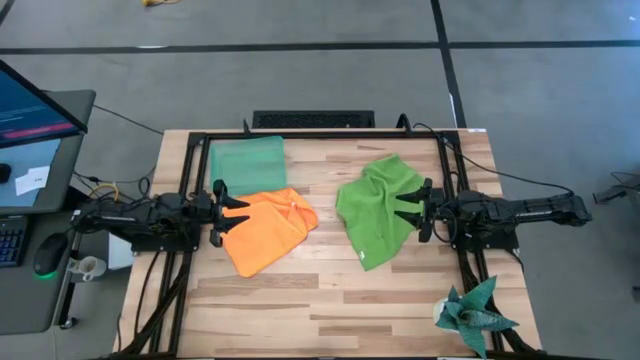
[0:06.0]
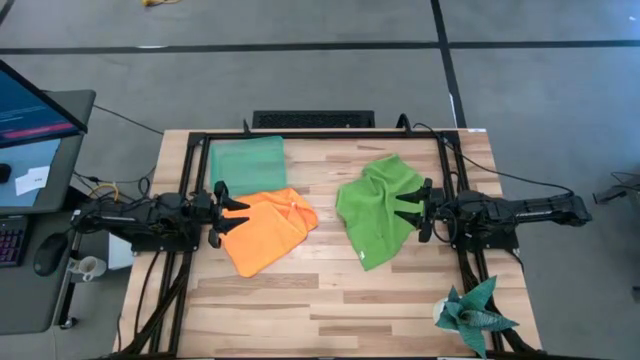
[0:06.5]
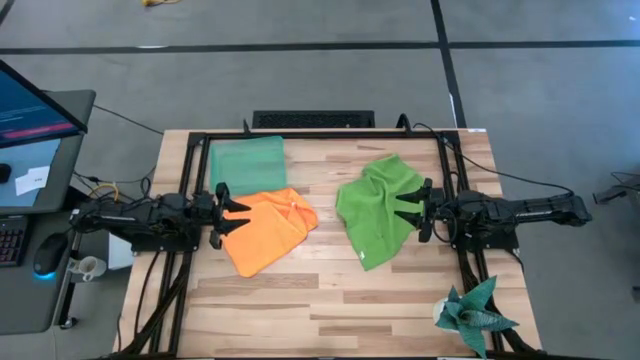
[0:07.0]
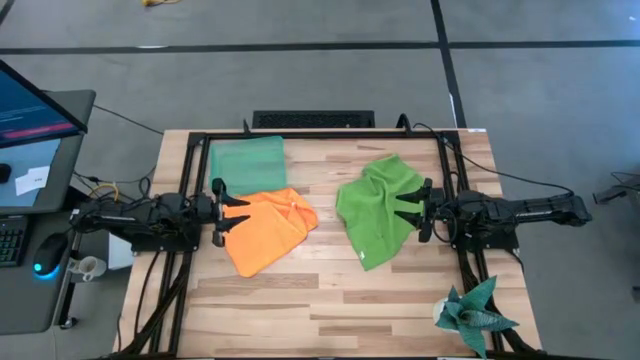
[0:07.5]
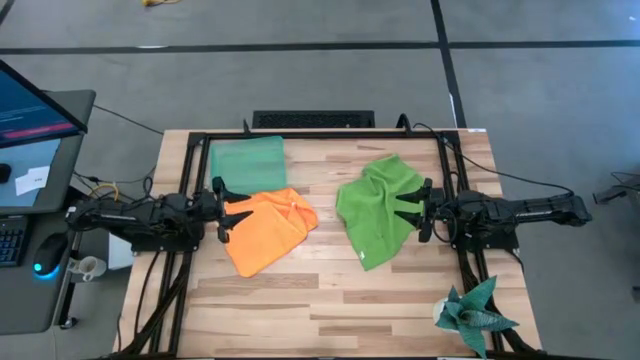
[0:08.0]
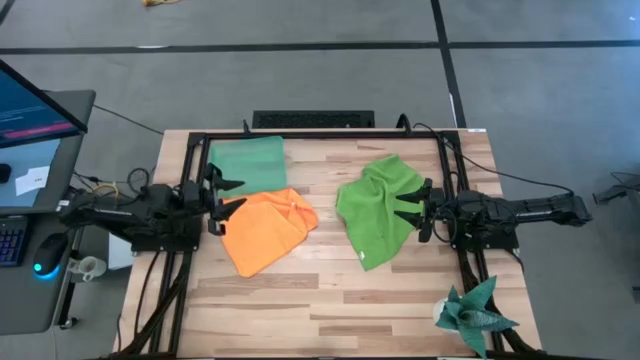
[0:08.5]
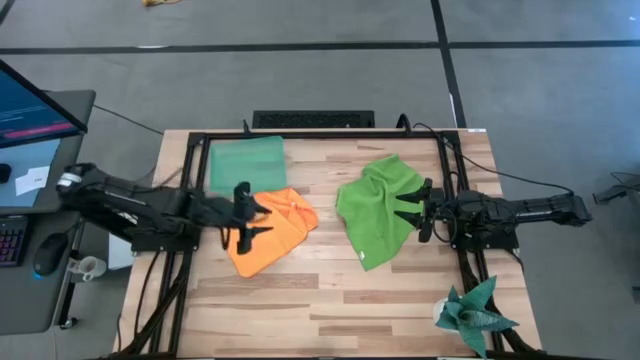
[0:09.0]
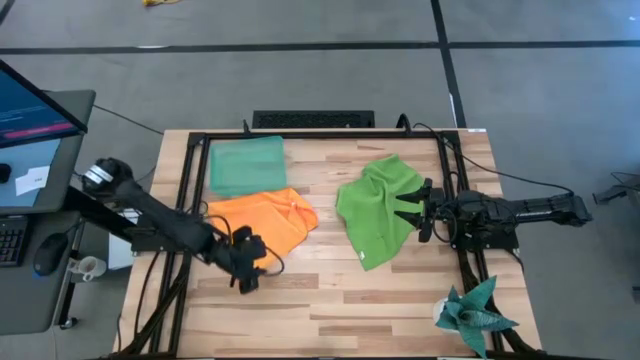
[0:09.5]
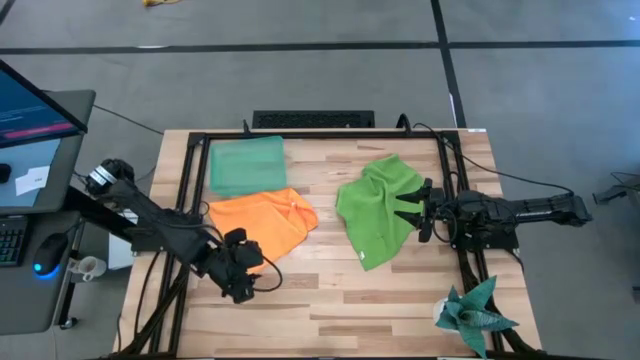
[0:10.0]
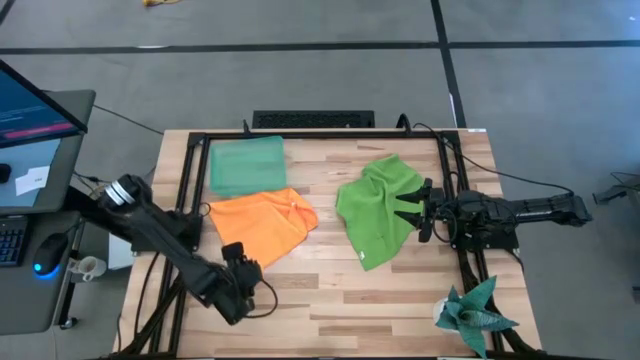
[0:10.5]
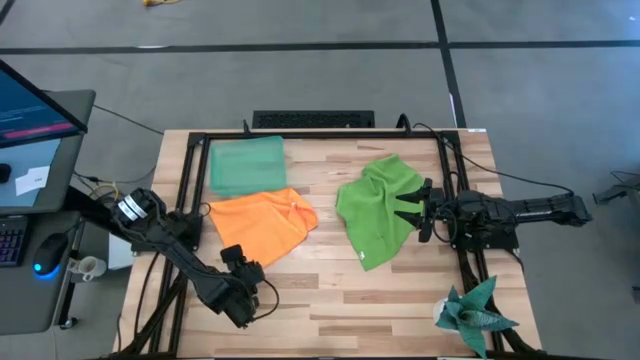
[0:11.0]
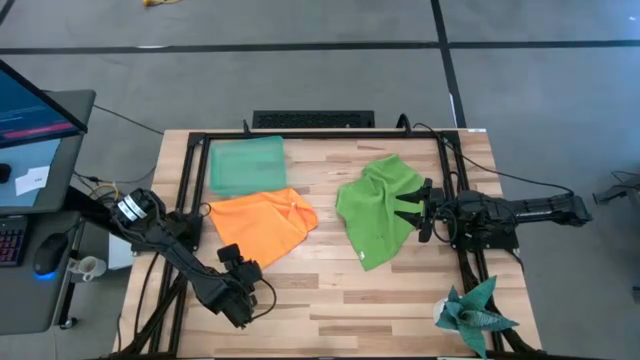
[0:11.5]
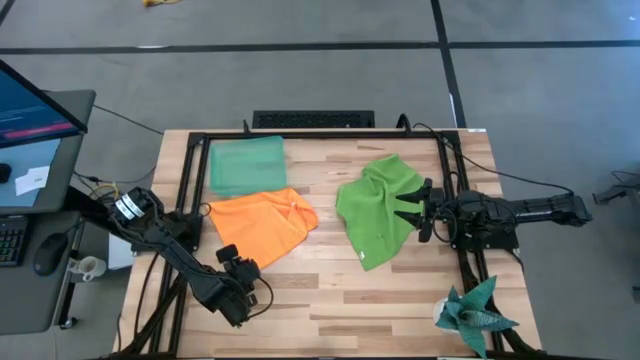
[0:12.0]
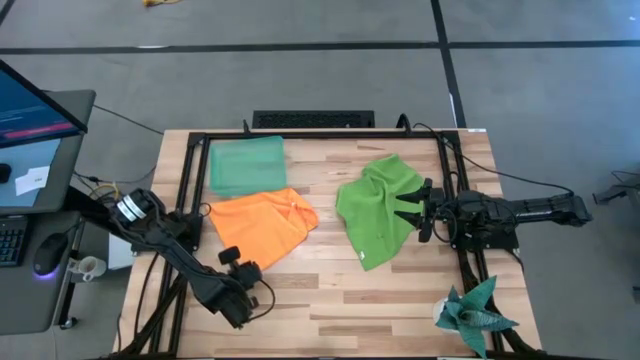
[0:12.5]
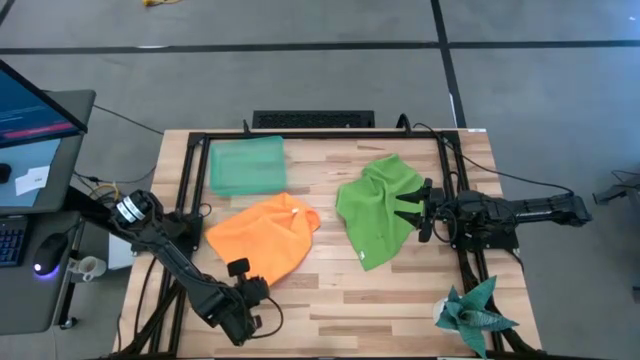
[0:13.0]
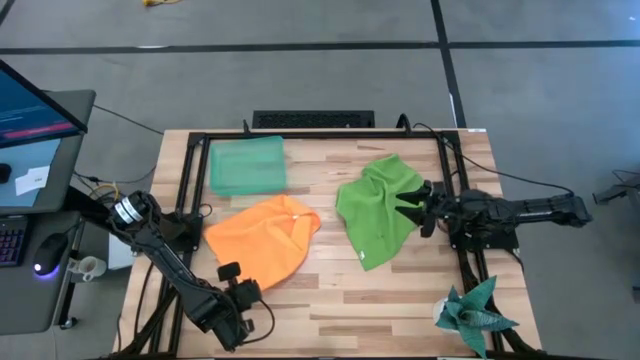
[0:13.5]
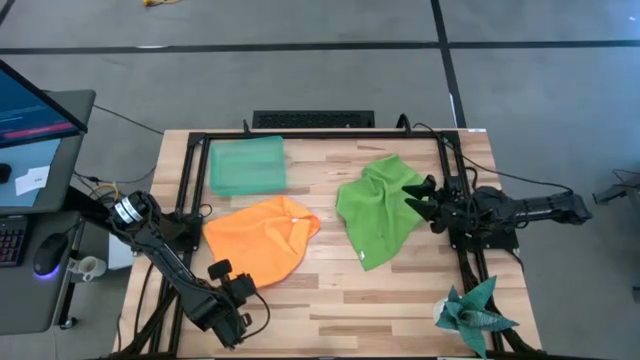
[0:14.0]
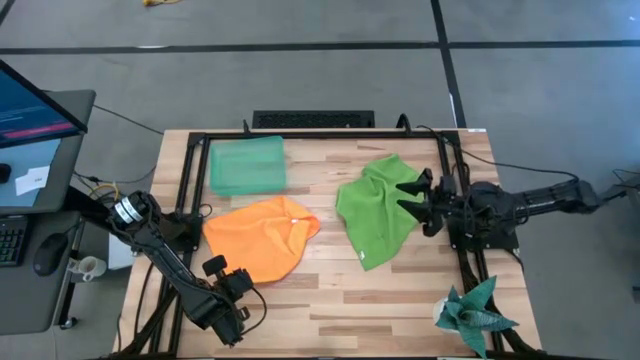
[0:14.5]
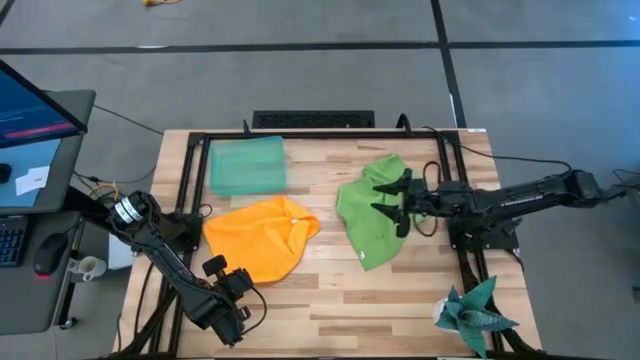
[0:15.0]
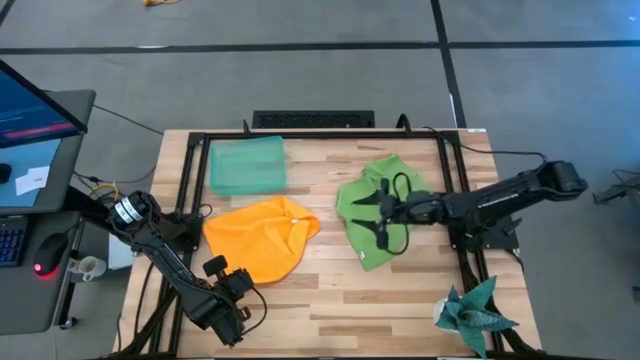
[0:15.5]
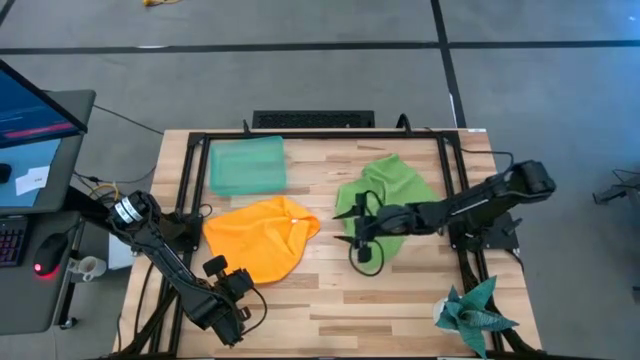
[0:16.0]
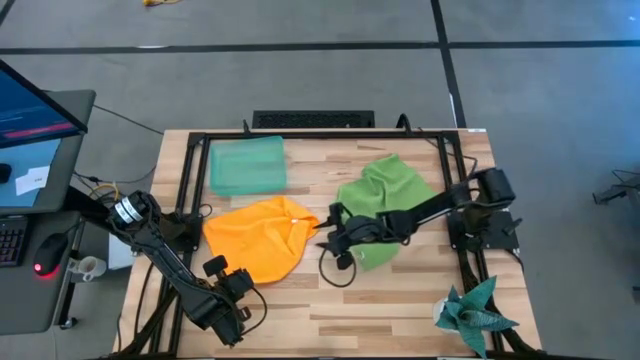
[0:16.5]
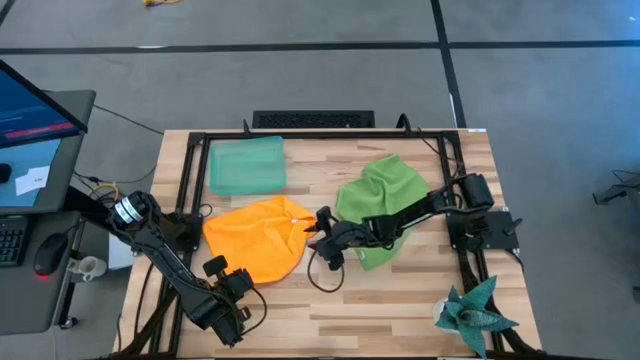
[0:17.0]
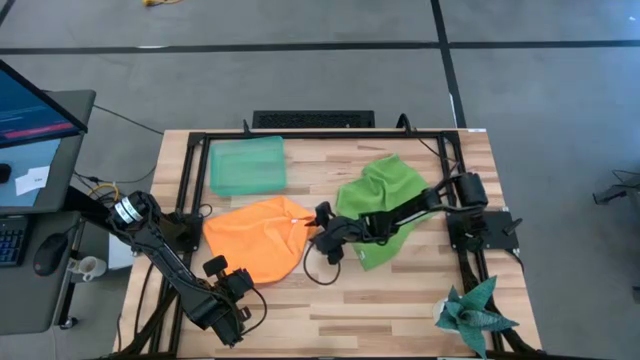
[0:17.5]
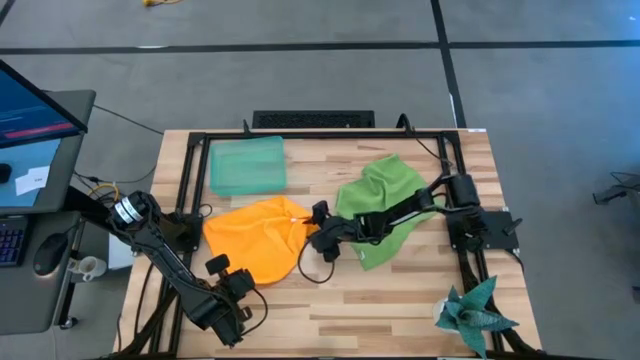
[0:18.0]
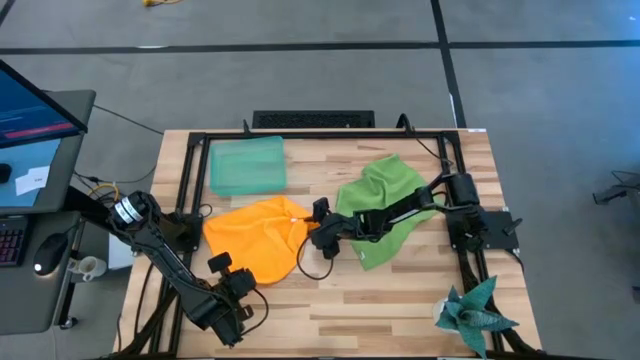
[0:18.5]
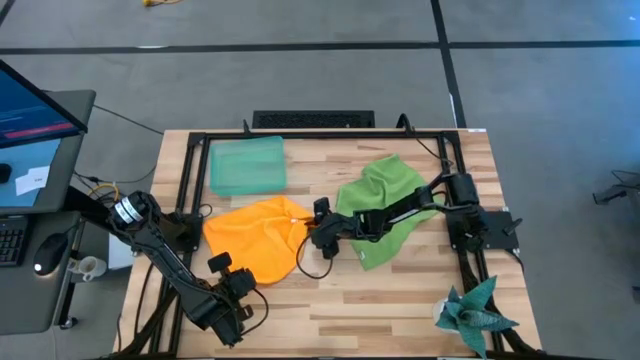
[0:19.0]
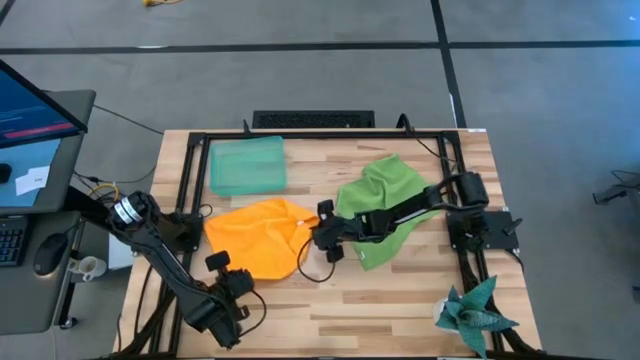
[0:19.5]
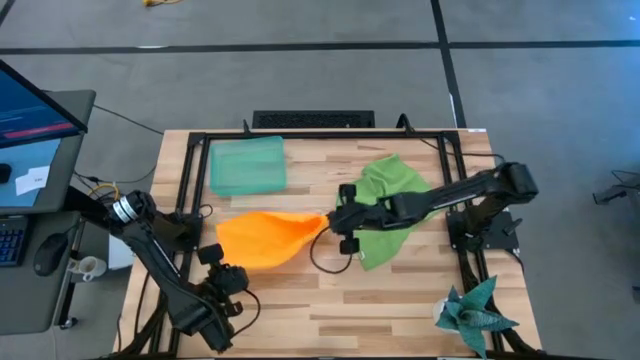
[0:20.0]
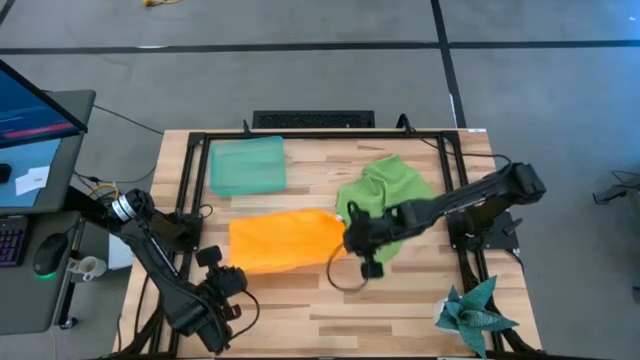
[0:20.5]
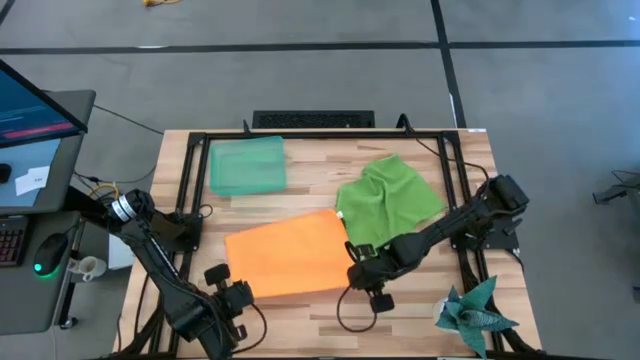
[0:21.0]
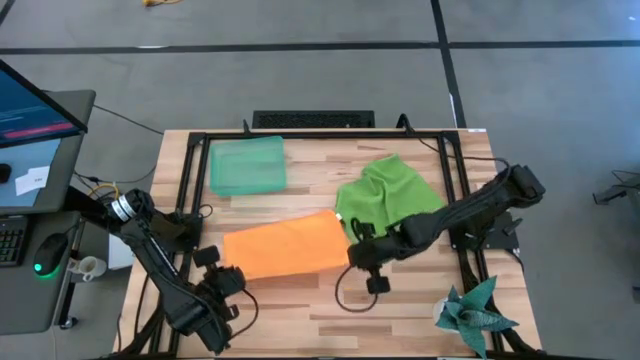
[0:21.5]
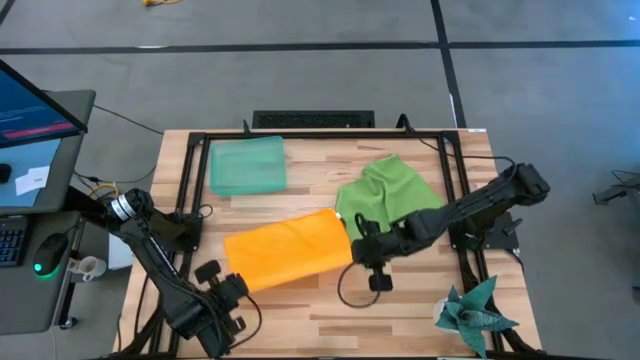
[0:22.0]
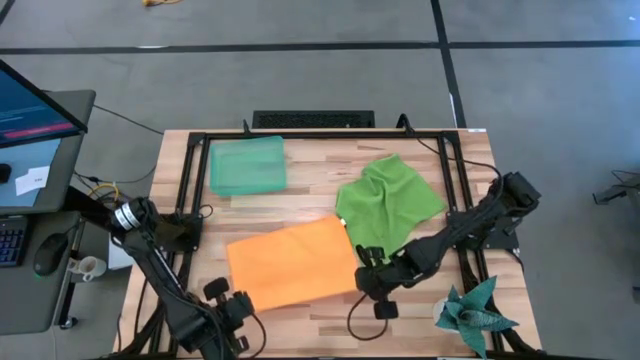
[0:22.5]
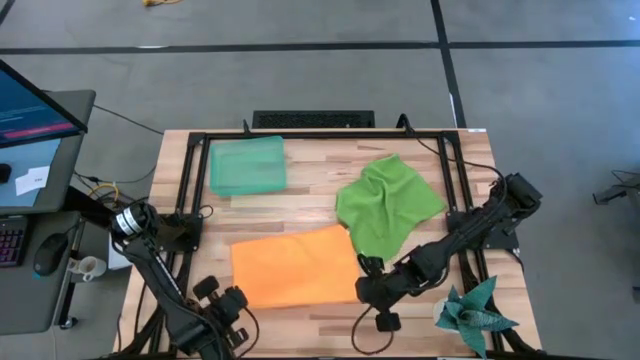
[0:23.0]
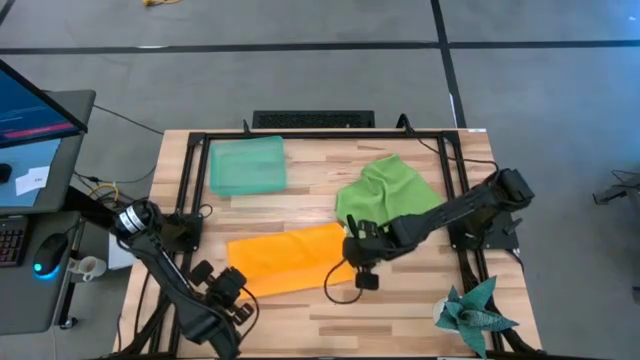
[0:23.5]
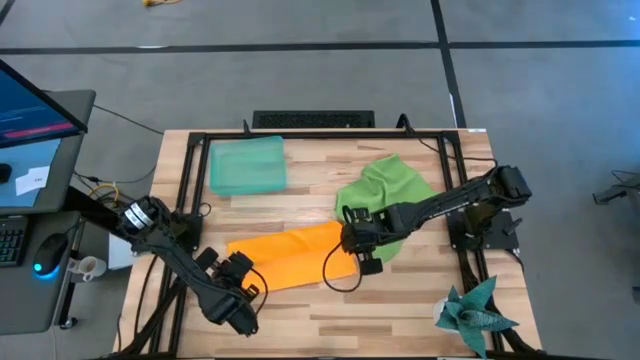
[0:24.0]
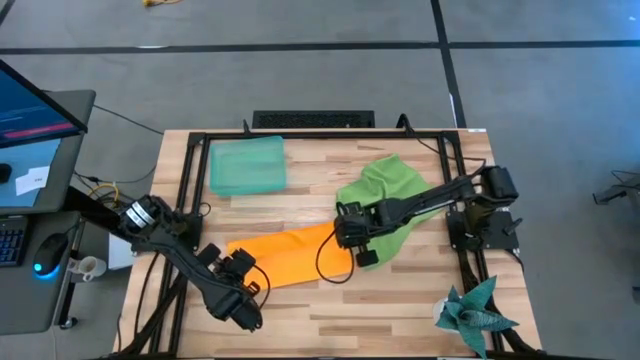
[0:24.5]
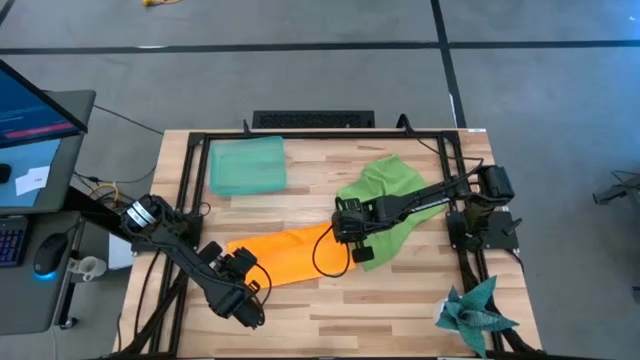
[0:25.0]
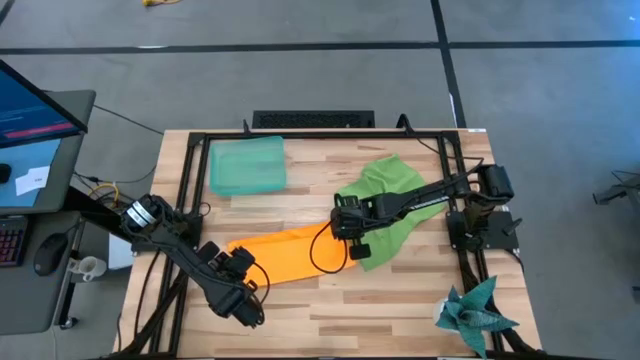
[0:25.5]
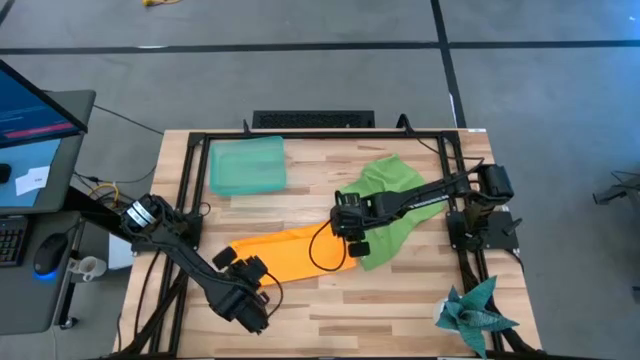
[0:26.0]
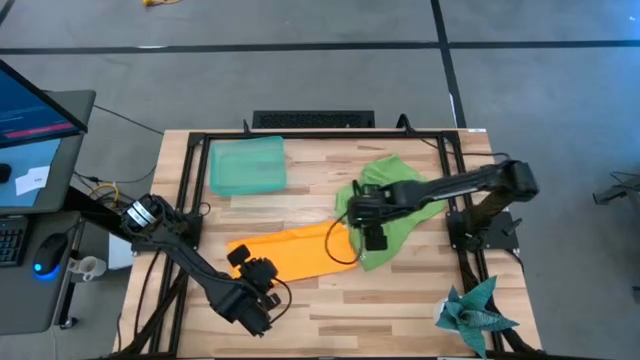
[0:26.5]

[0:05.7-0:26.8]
Task: Roll microfiber towels into tight, uniform cylinder then place into a basket
Roll the yellow microfiber cloth
